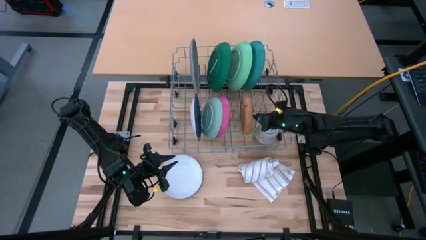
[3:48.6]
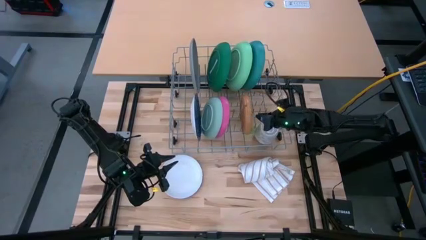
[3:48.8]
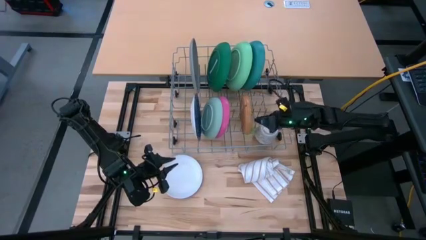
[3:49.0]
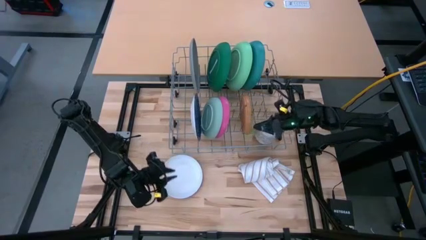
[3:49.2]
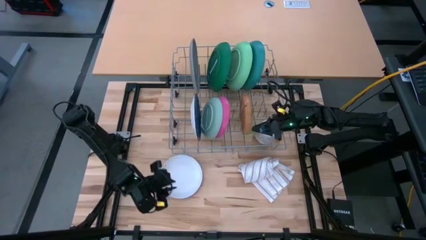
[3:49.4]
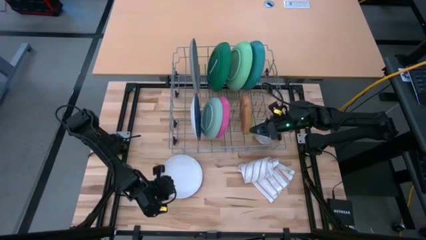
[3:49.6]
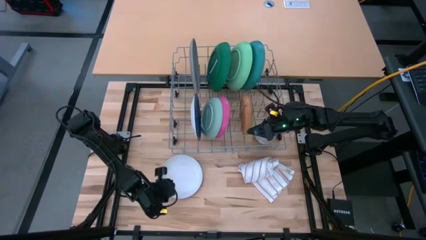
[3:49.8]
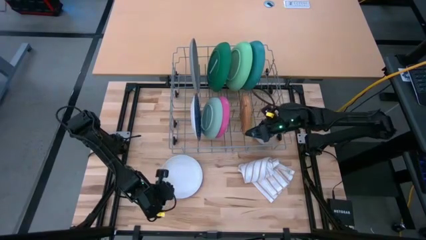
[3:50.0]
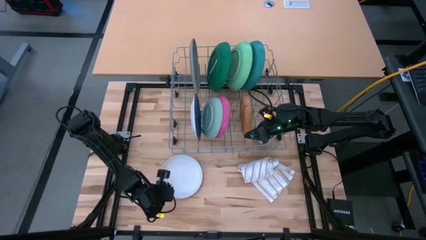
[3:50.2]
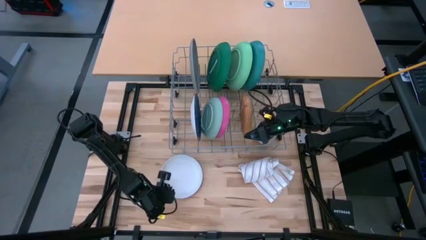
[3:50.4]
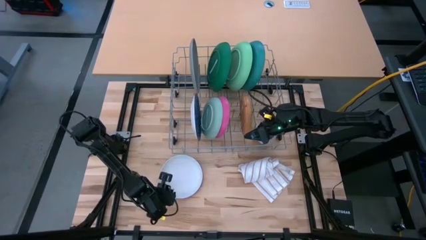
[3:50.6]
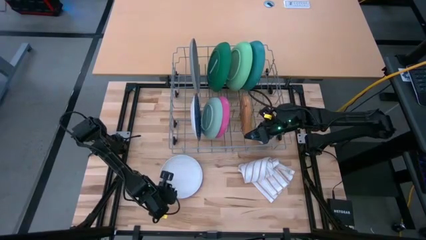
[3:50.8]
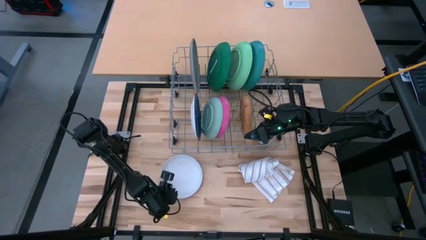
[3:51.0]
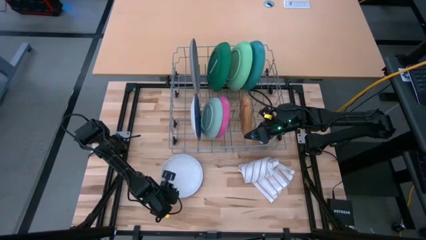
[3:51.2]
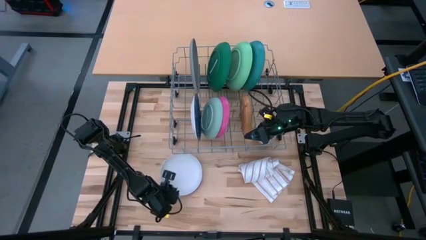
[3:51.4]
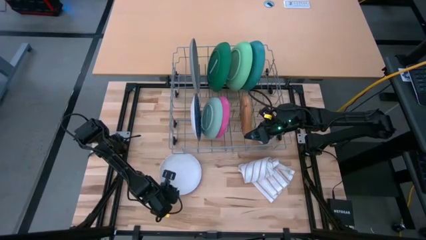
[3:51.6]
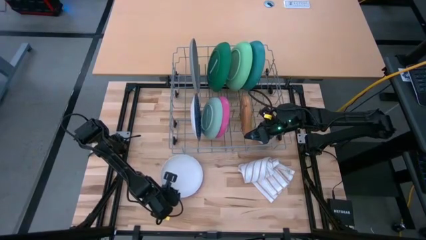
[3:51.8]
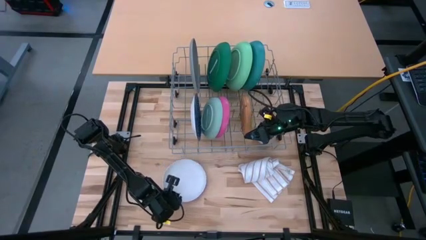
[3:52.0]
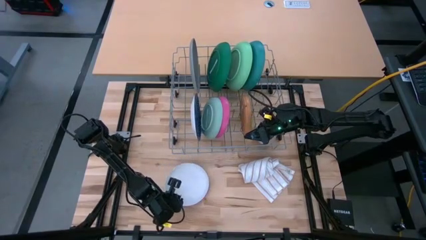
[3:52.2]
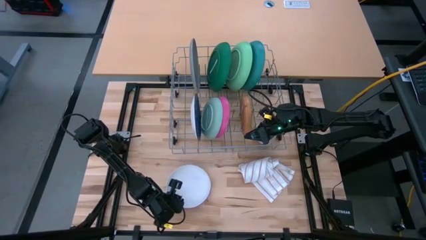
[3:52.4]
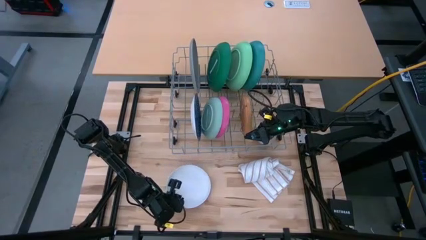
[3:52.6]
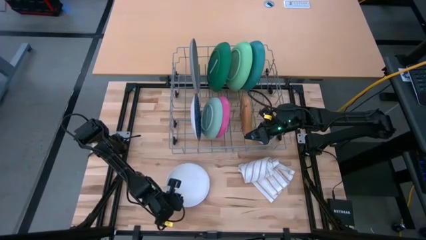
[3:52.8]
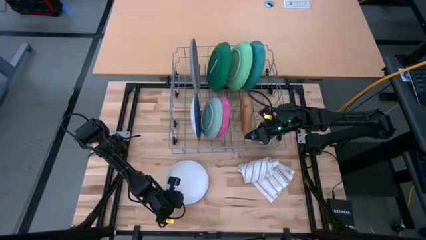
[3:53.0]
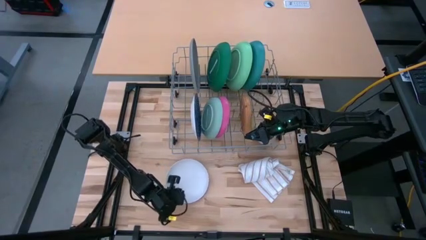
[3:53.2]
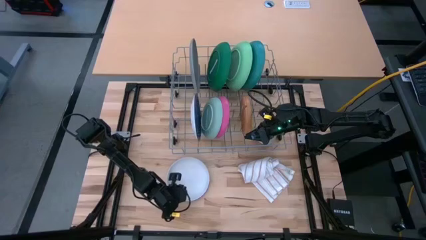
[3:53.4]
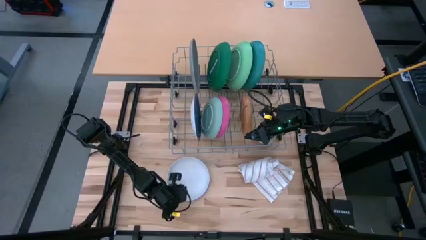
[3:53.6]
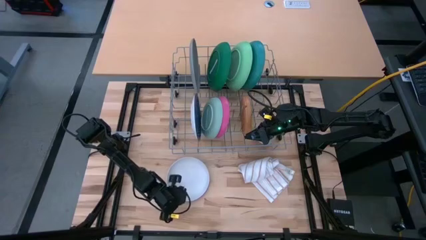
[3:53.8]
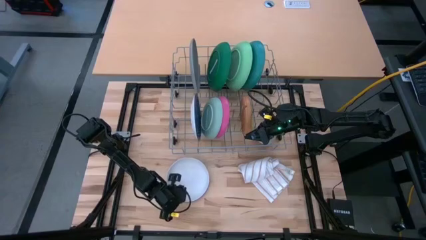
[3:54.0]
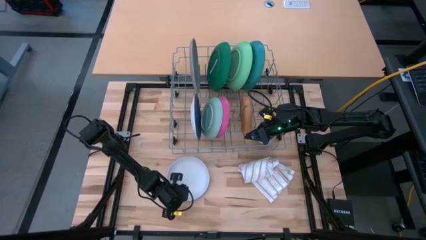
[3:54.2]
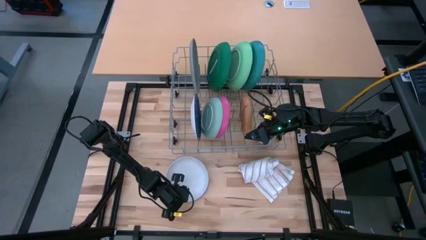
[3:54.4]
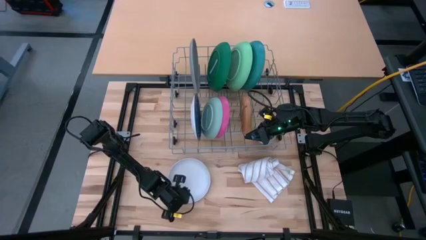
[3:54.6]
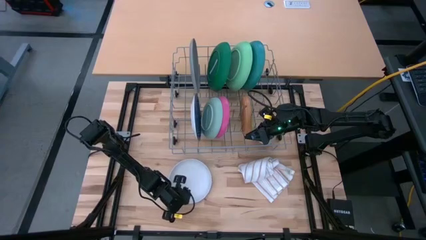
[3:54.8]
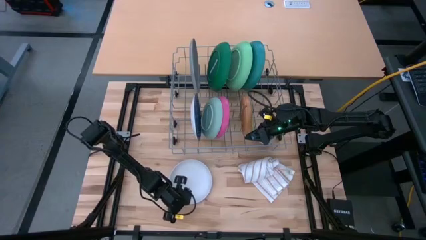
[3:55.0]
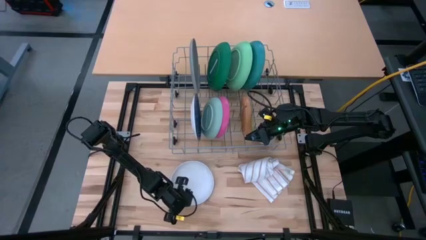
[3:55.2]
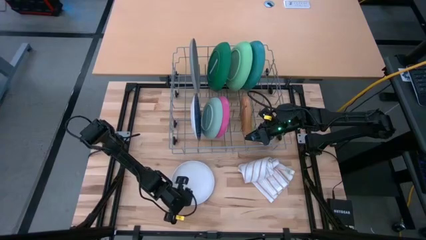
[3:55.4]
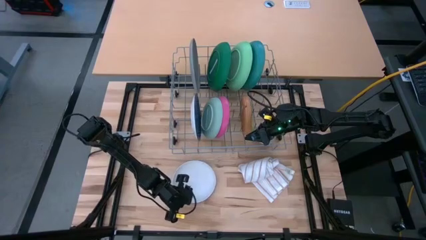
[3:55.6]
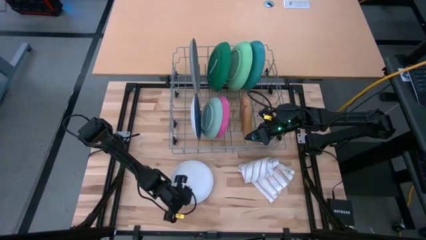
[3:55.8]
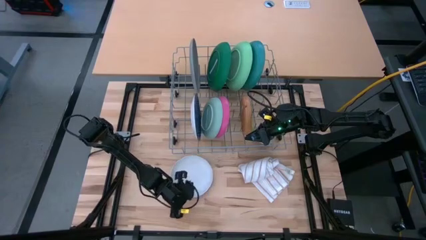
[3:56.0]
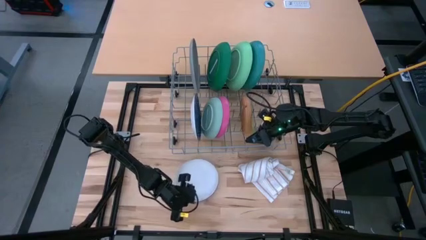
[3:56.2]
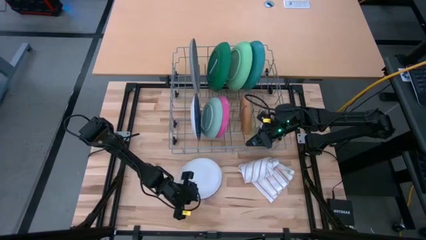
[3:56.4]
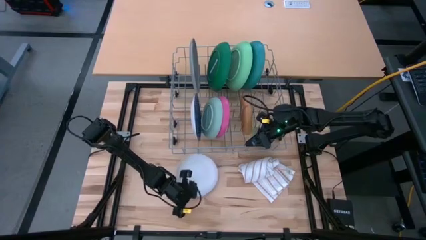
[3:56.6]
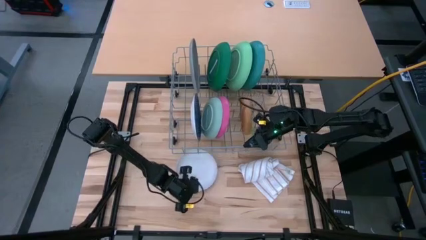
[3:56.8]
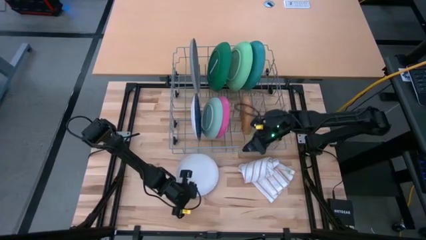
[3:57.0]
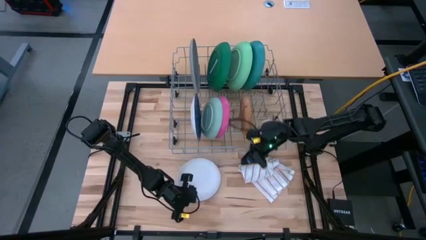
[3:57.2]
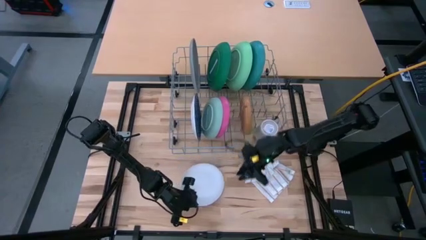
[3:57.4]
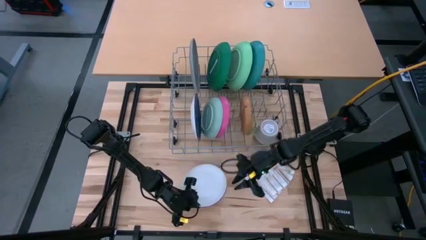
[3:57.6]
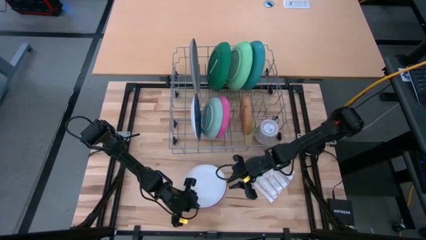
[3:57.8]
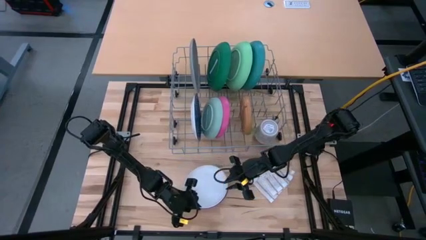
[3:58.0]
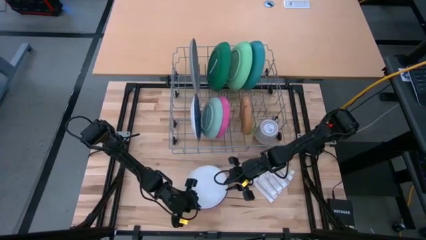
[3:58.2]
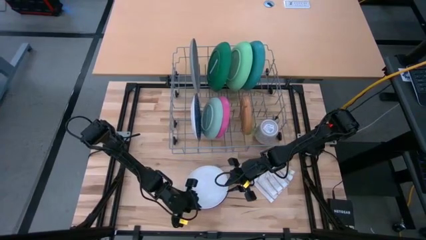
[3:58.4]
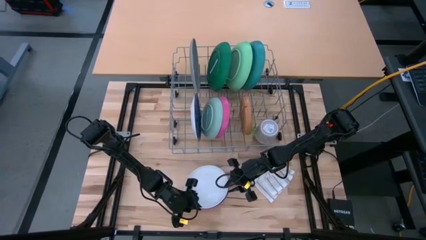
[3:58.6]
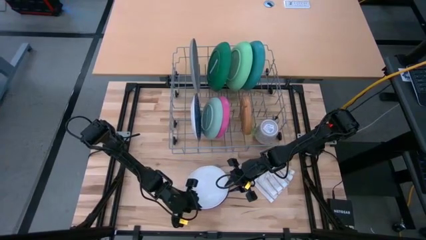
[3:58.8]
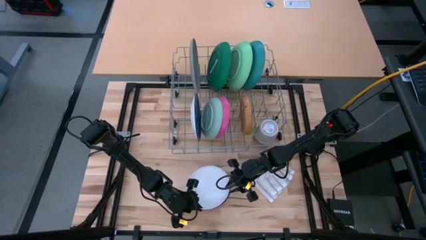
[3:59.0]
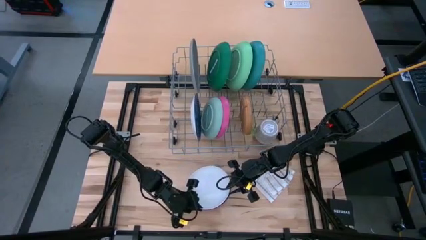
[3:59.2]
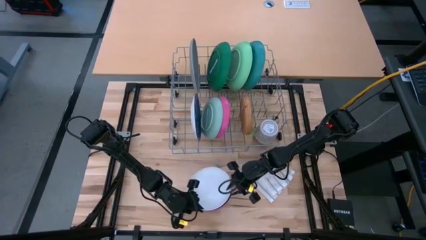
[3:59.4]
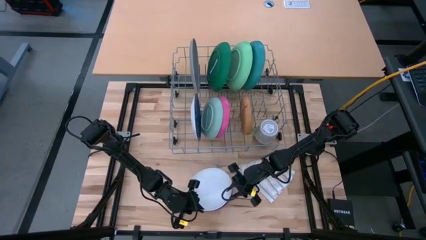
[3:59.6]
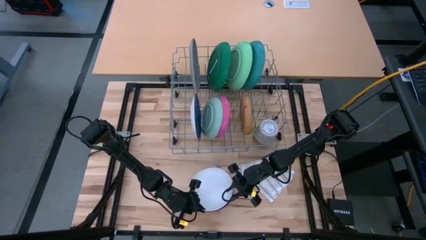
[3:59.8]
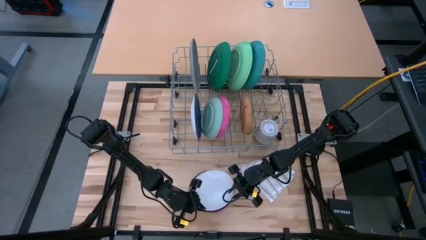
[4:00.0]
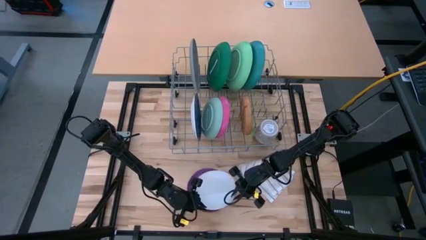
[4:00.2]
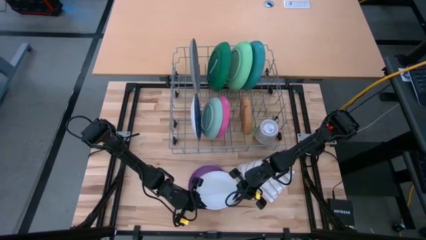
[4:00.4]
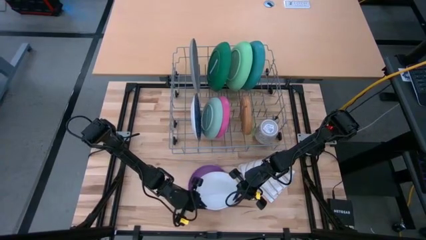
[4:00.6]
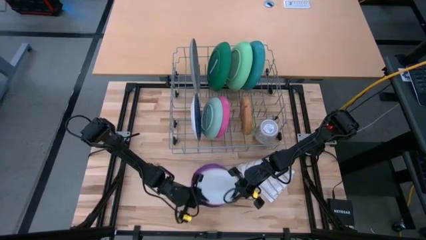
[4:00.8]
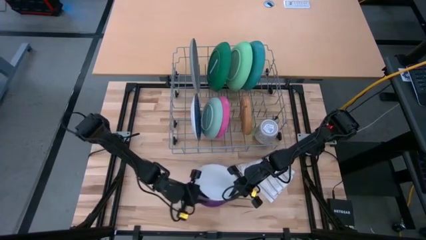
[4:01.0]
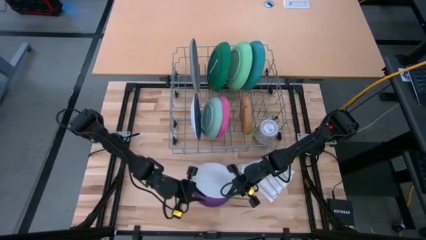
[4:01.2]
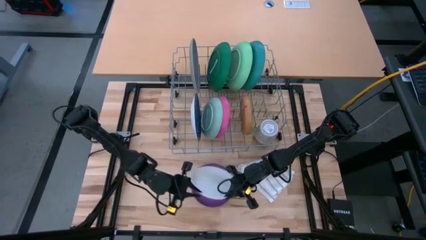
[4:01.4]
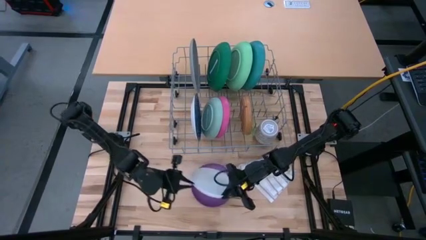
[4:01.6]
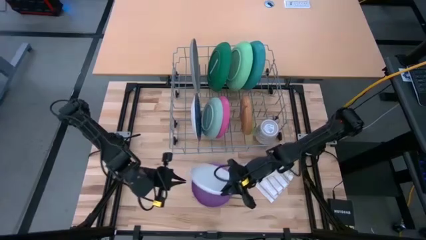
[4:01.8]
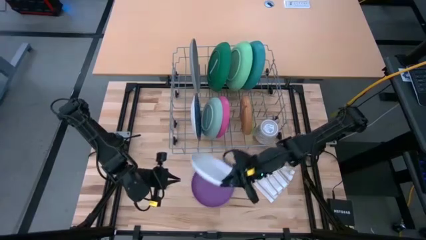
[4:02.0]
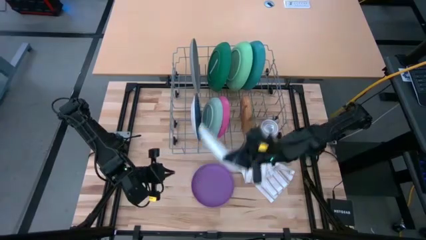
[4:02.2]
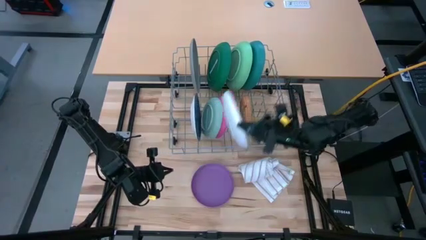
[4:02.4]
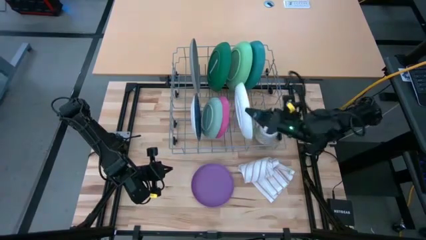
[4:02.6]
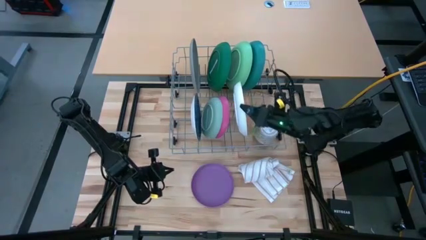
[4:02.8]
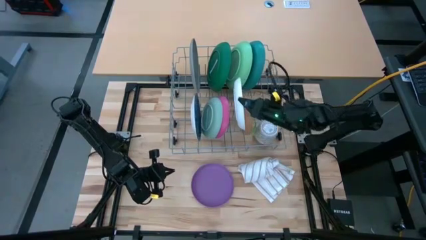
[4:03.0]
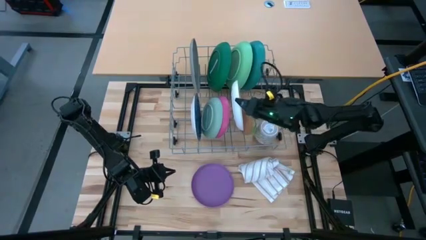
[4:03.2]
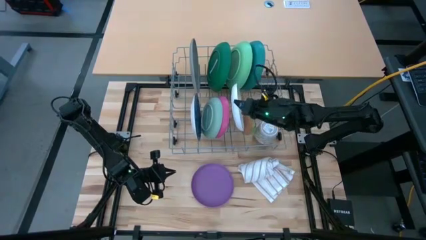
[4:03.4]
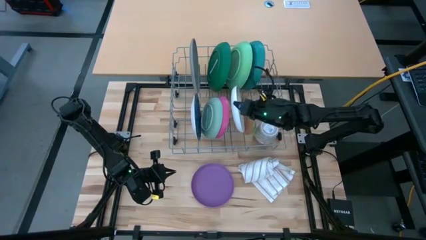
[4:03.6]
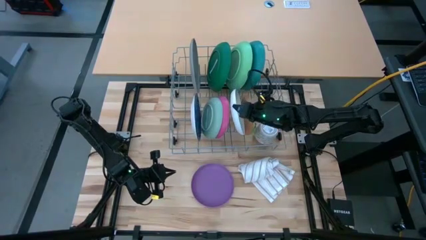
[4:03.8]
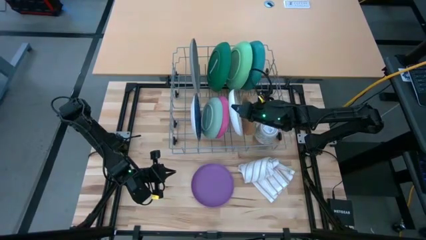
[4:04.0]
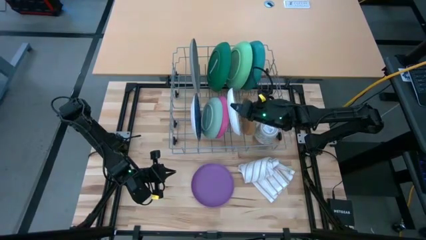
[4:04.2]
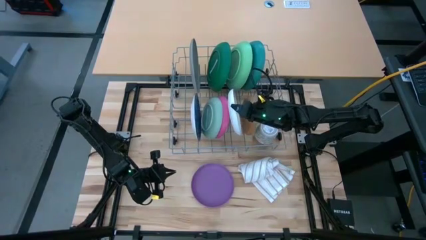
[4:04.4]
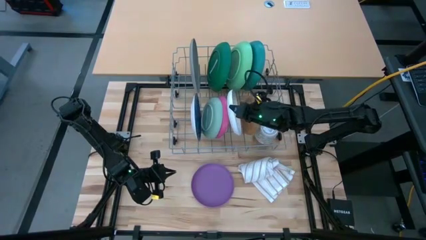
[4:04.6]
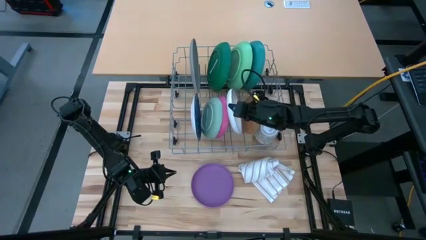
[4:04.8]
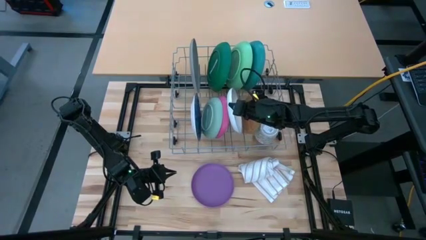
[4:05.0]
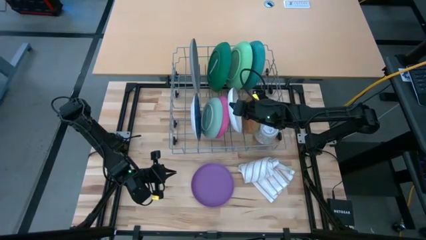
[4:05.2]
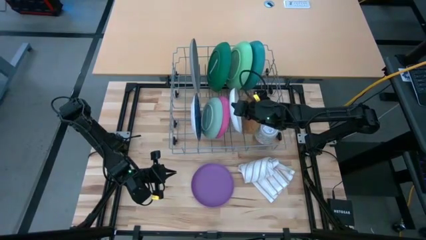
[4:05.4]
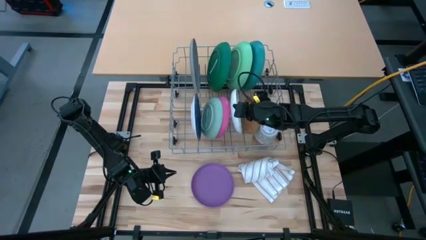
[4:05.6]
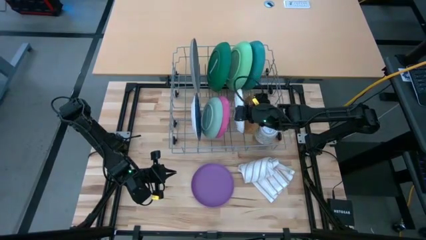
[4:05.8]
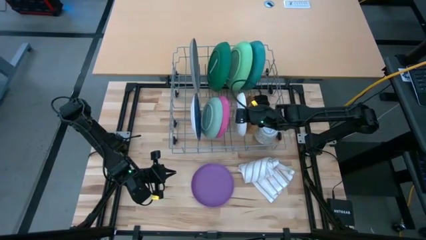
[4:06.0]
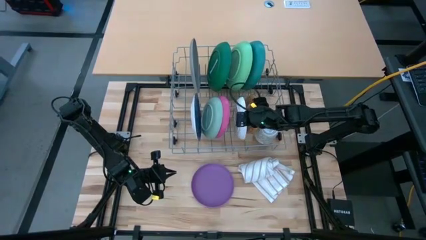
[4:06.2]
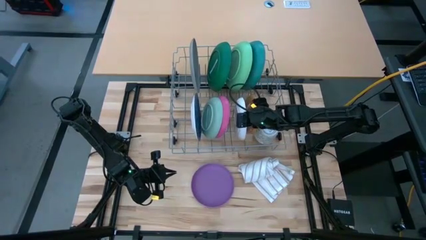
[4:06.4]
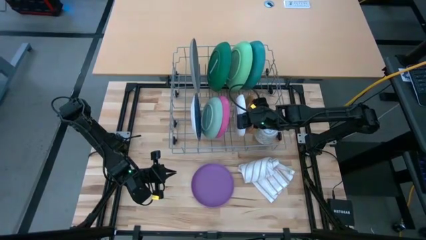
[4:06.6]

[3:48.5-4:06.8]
Task: Sort dishes
Put the white plate in the dish rack
